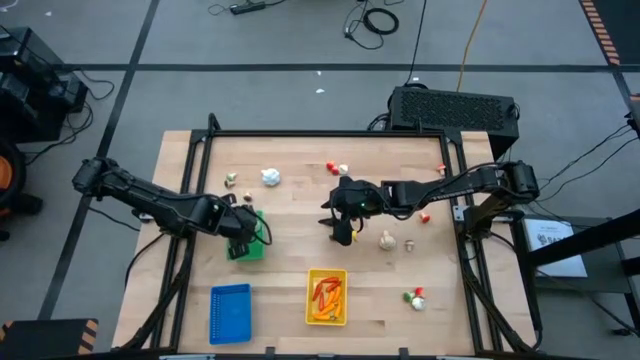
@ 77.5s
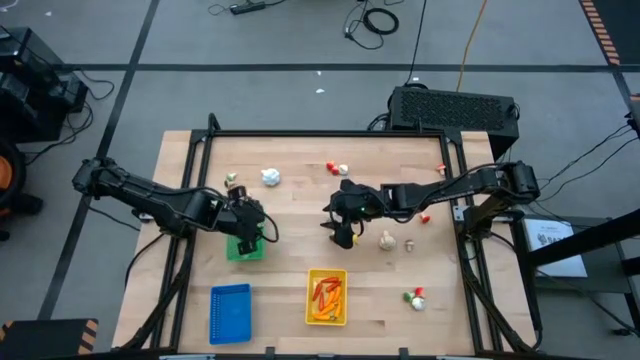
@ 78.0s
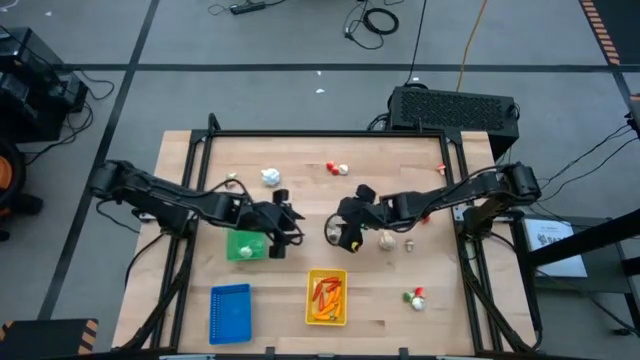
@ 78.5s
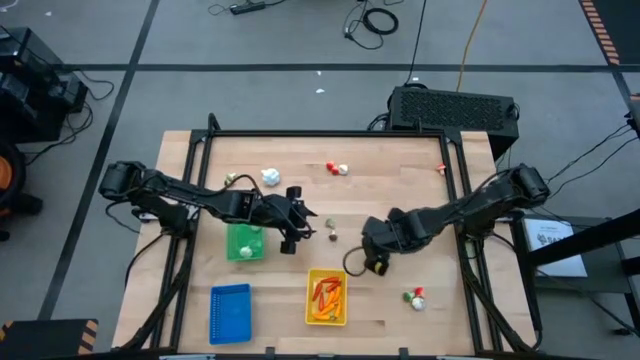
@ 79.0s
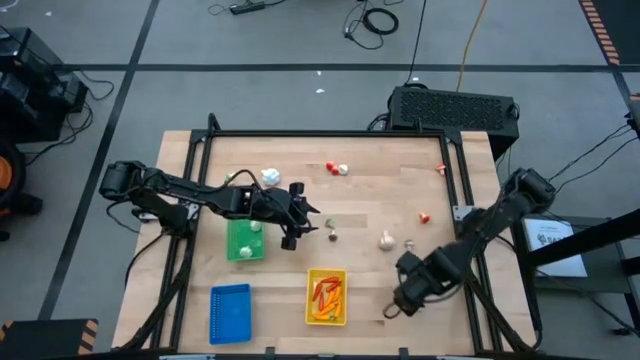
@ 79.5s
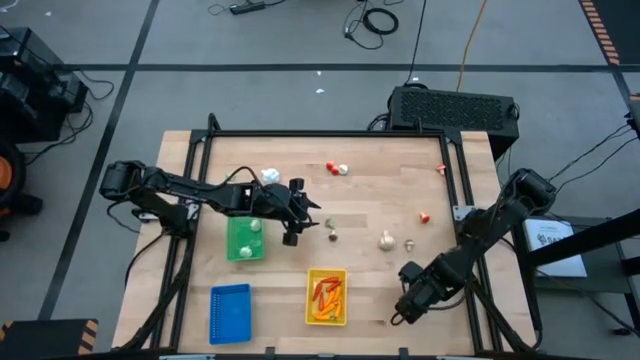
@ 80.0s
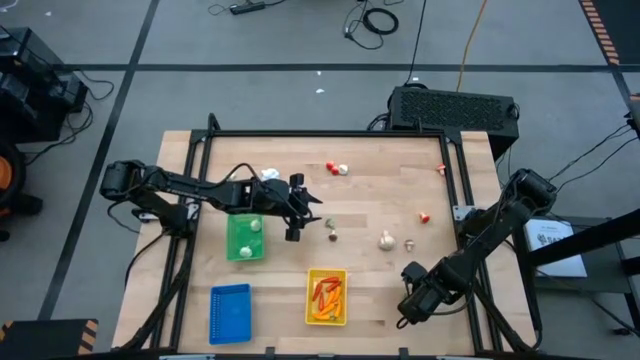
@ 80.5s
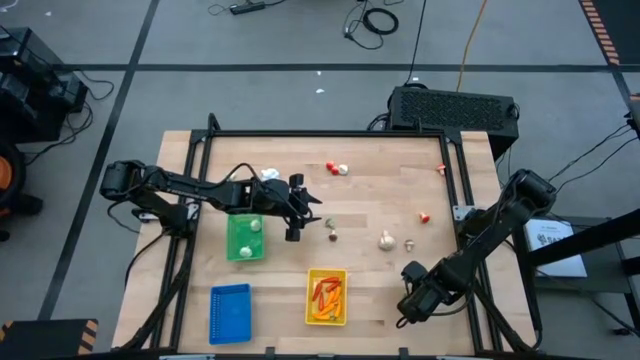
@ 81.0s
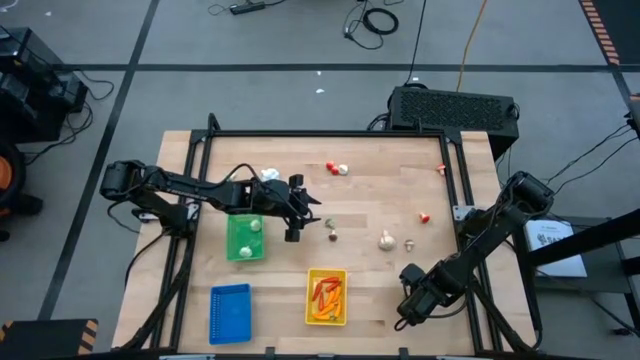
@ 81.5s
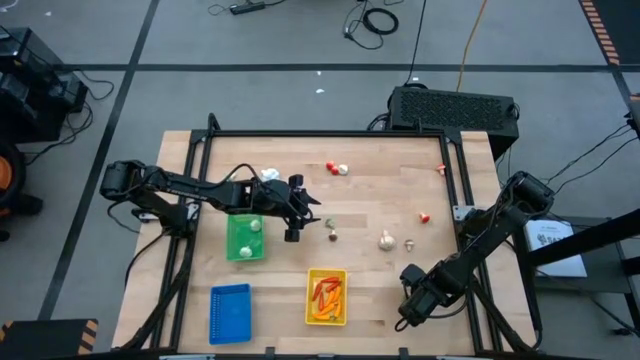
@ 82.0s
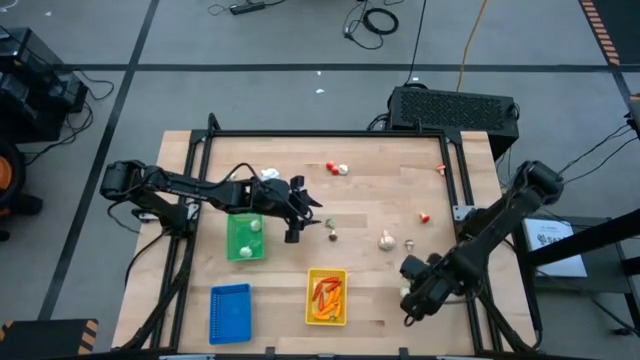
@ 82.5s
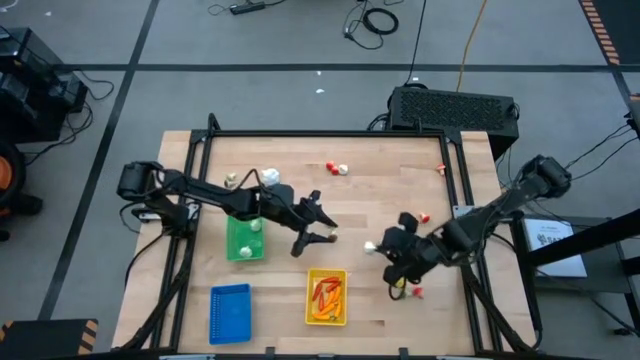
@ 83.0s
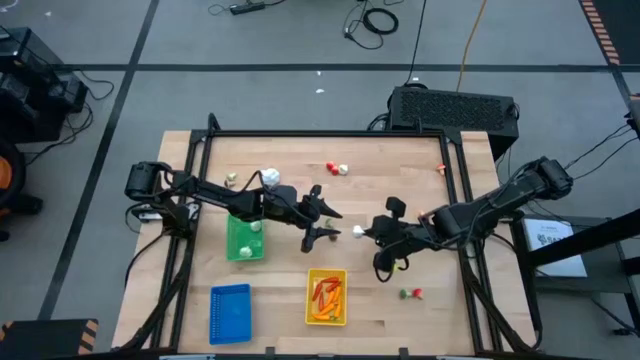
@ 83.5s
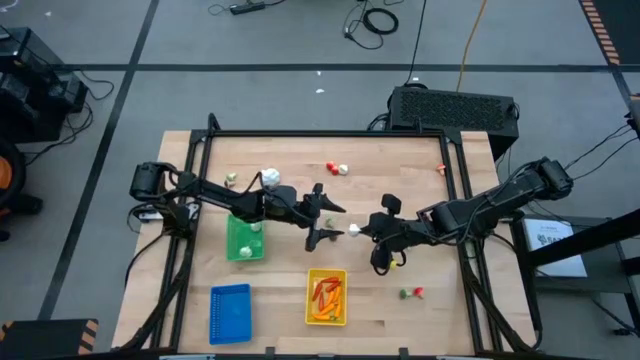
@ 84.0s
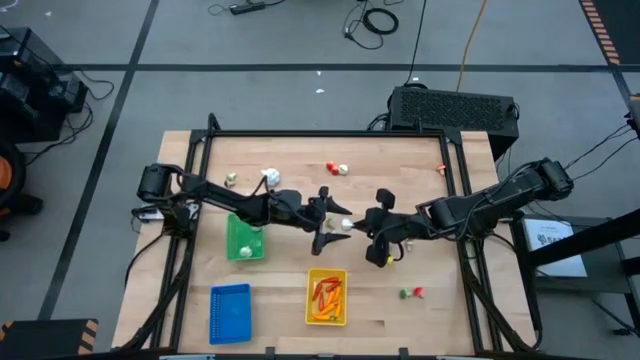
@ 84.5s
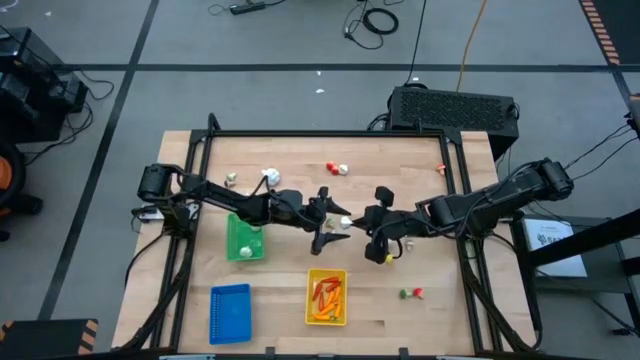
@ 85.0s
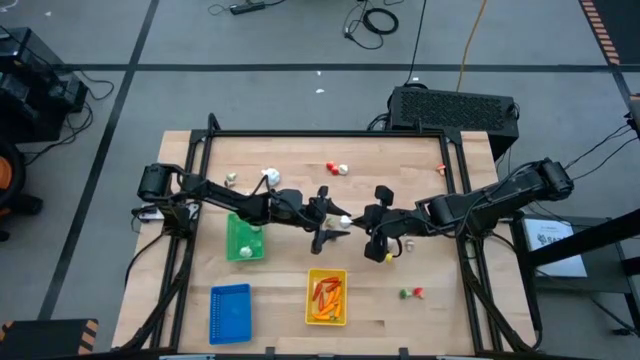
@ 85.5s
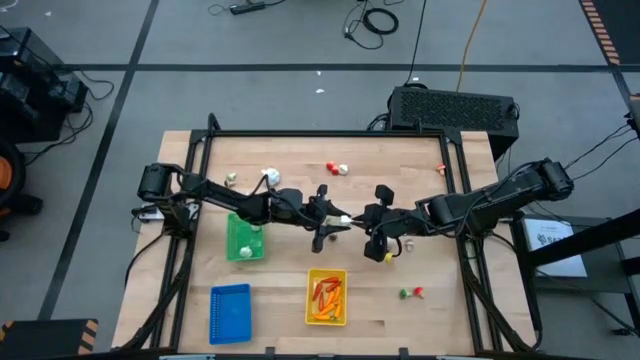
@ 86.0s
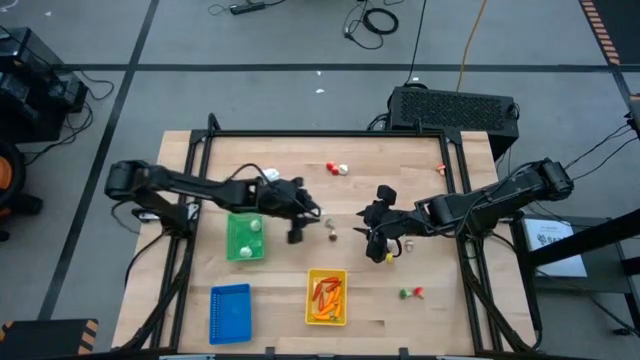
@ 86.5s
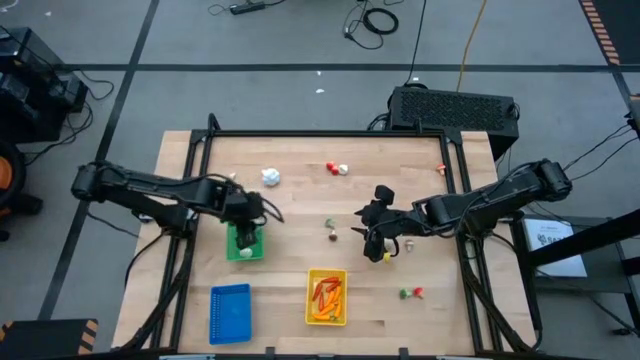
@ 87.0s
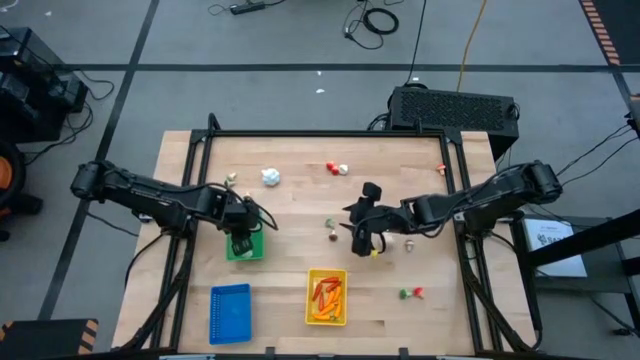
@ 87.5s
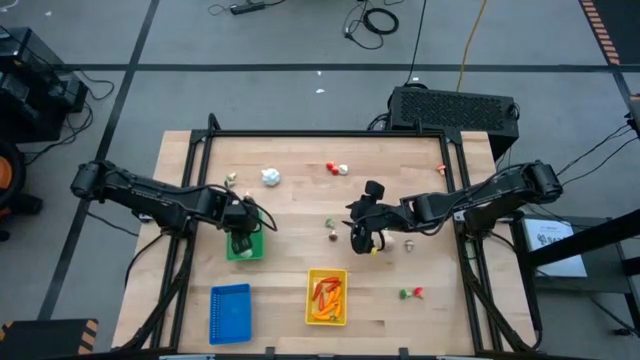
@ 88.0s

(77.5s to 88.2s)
Task: Sort produce into baskets
Put the garlic into the green basket

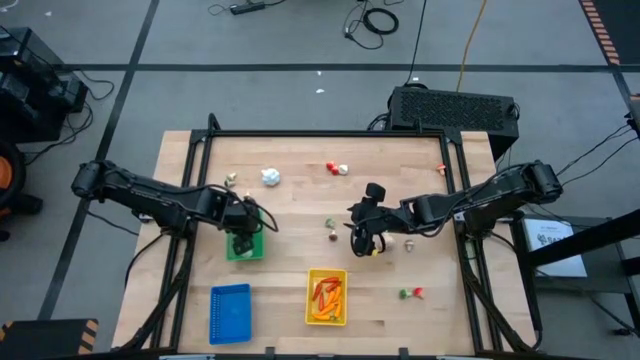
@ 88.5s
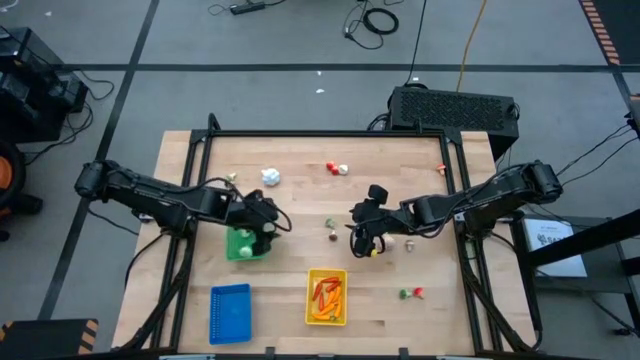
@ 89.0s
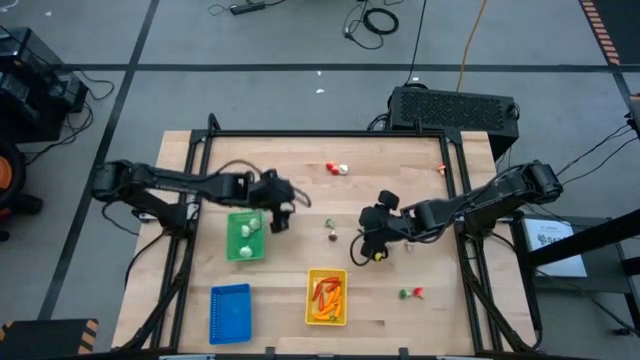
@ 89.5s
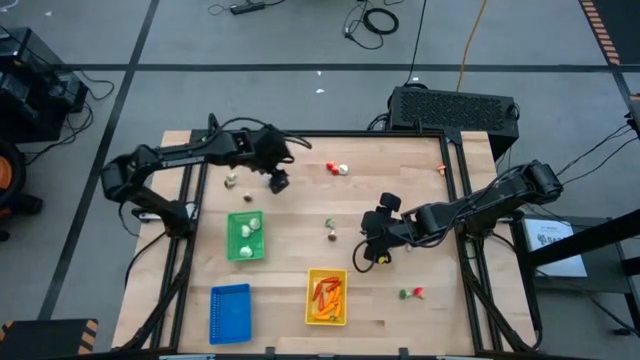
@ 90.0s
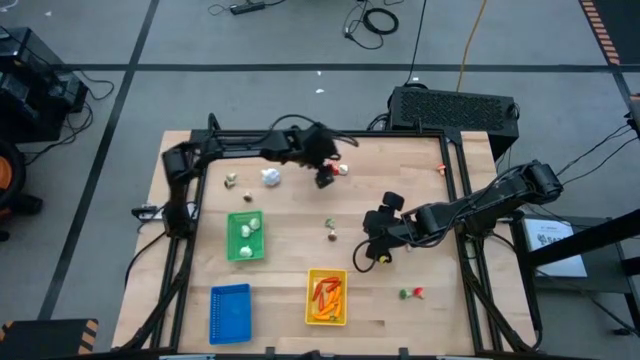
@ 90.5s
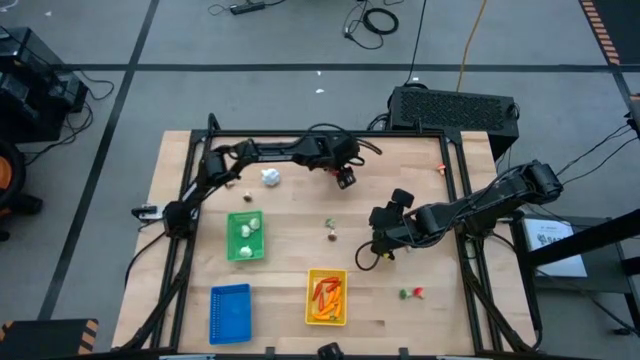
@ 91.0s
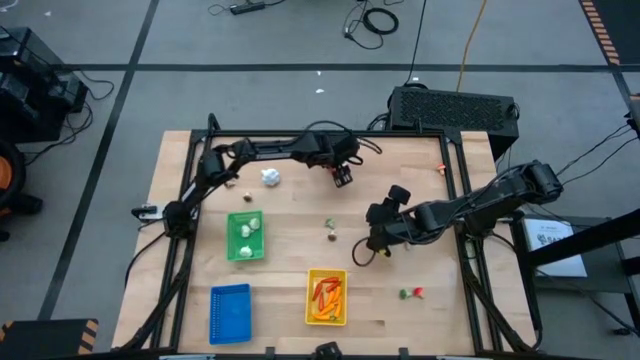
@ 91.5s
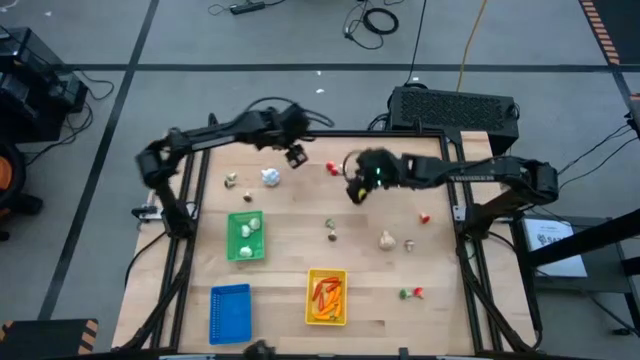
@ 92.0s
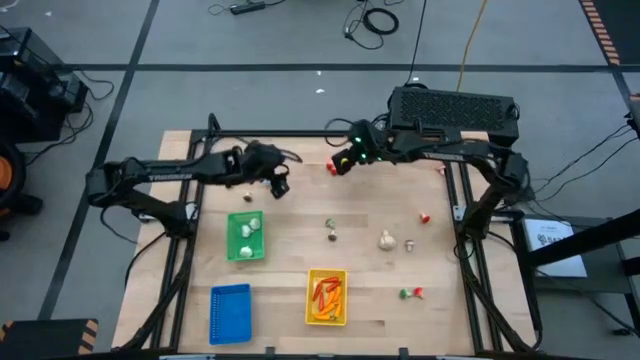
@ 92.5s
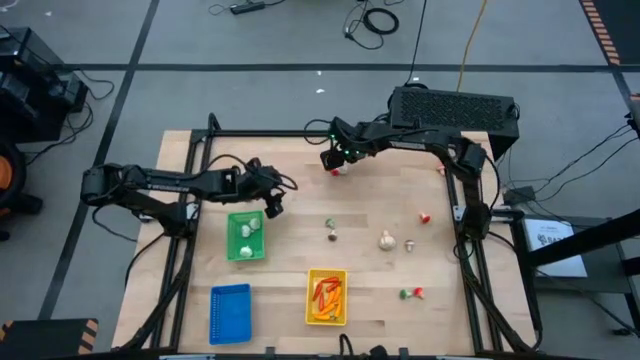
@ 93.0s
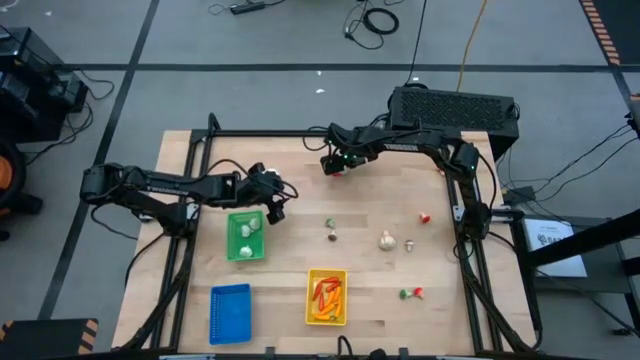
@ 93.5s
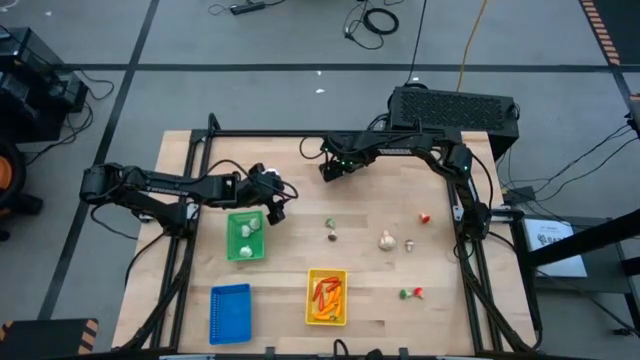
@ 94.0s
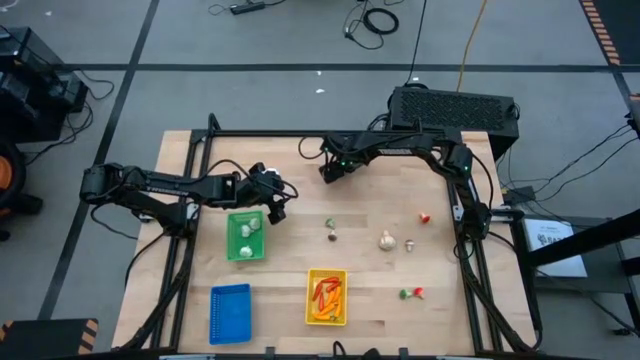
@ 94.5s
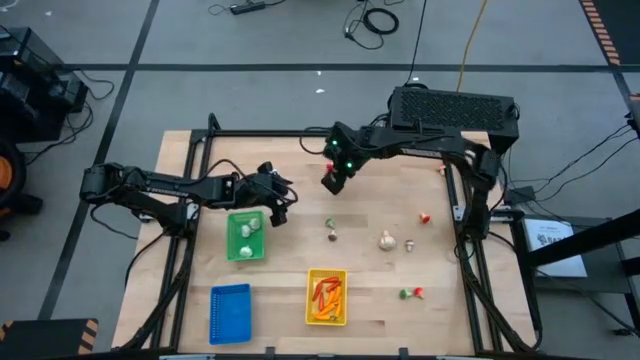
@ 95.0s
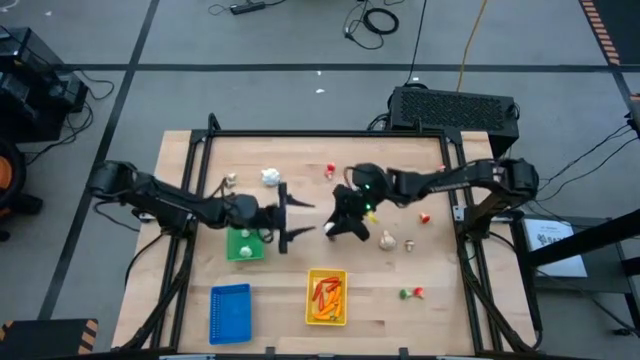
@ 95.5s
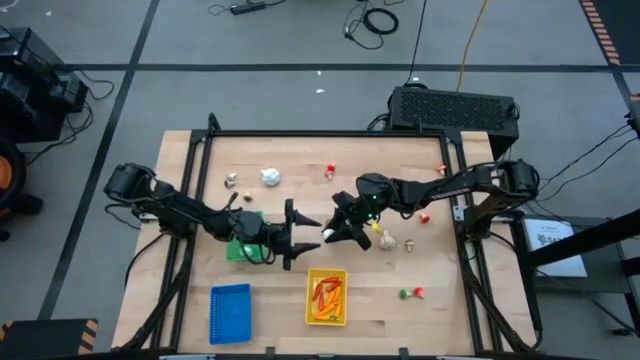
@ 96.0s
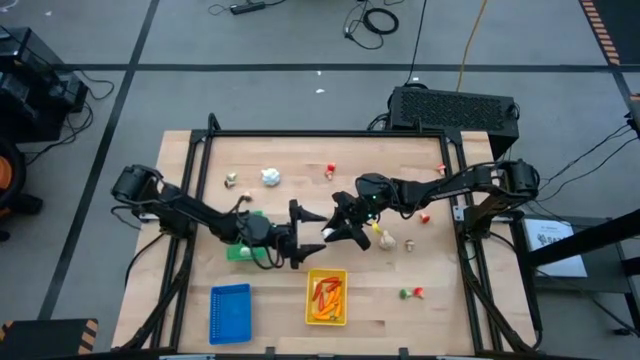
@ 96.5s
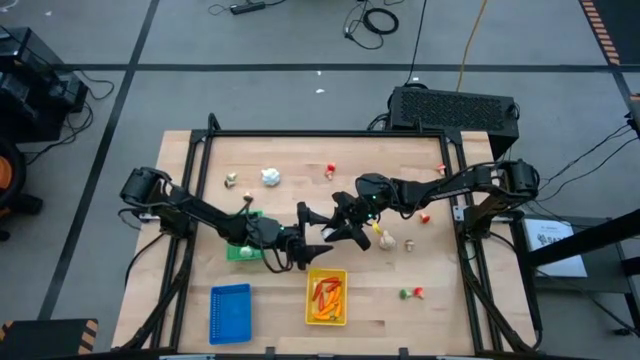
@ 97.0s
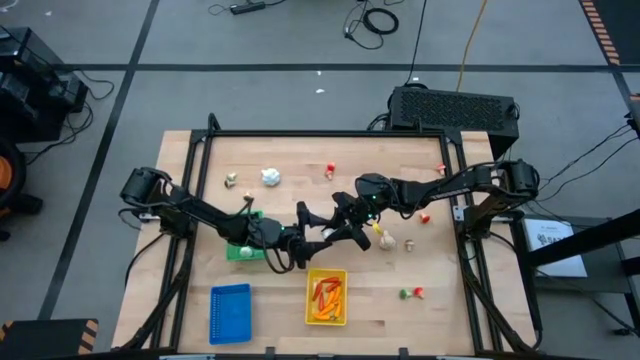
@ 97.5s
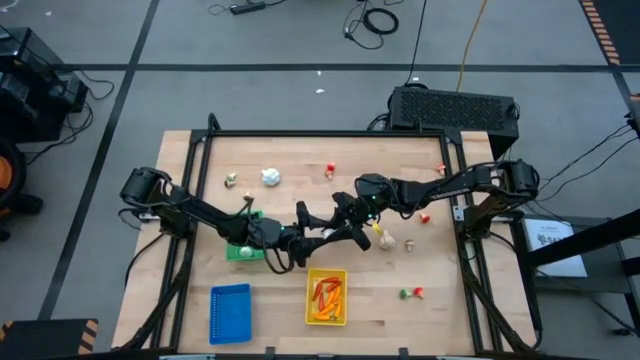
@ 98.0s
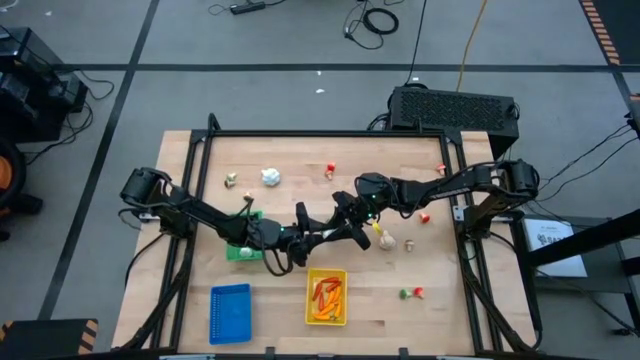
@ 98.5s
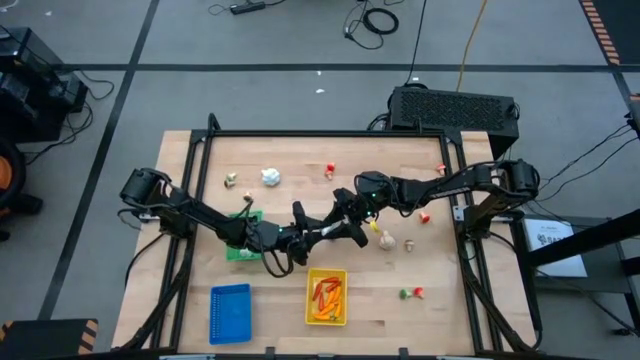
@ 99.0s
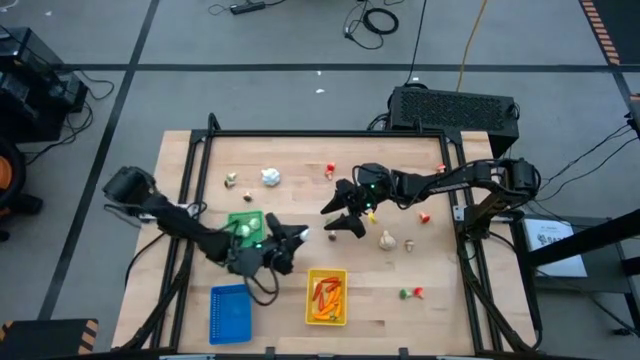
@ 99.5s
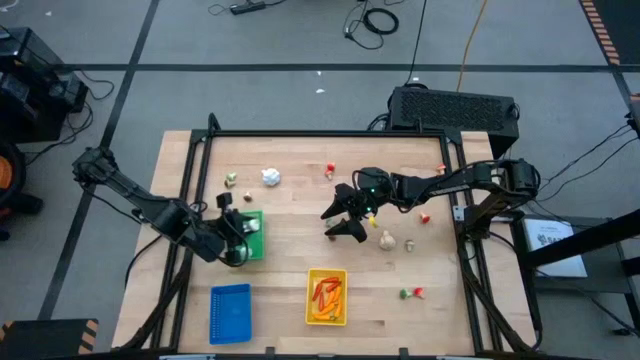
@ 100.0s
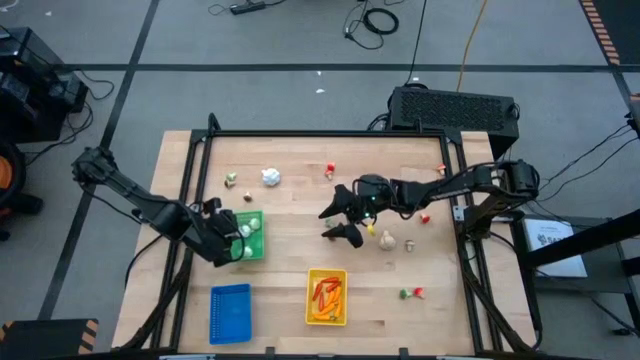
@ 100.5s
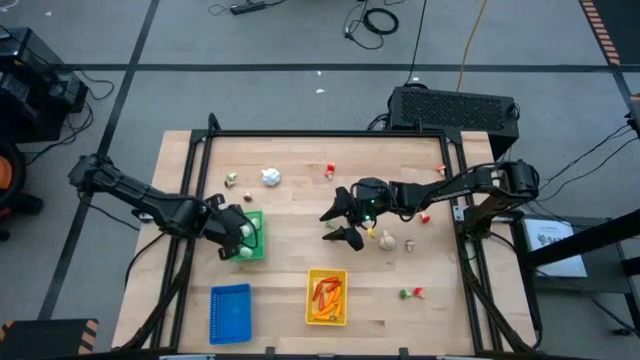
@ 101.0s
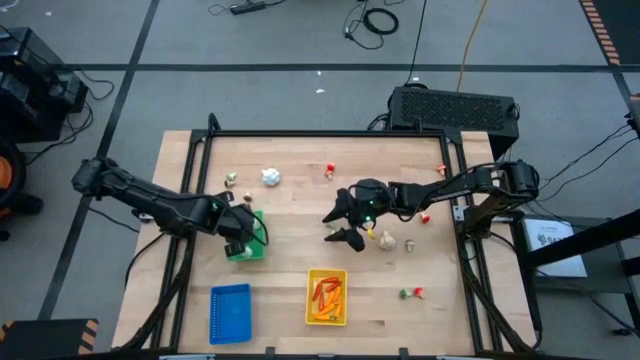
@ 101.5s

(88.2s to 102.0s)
Put the garlic into the green basket
